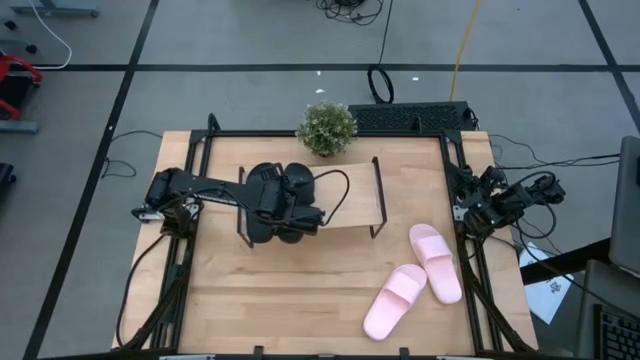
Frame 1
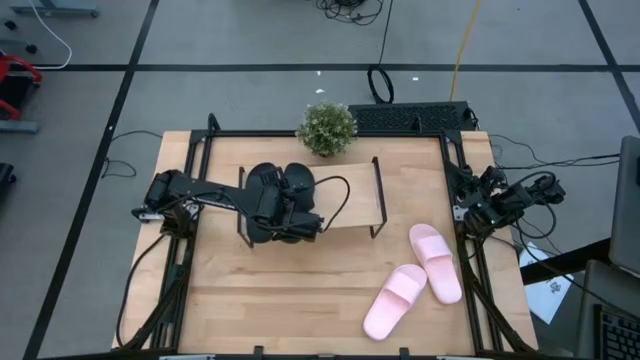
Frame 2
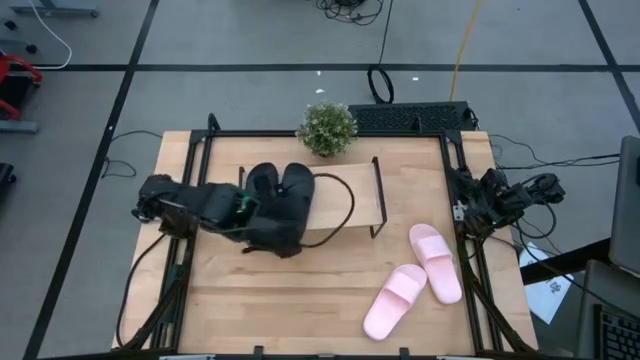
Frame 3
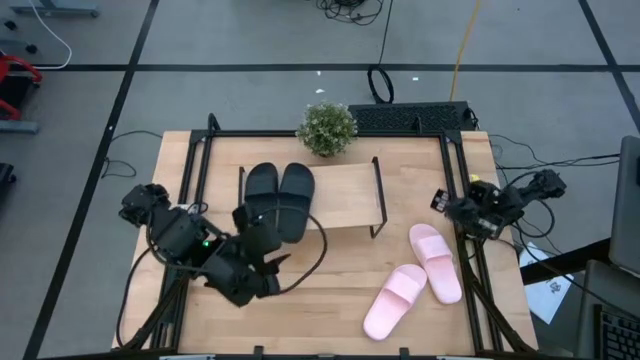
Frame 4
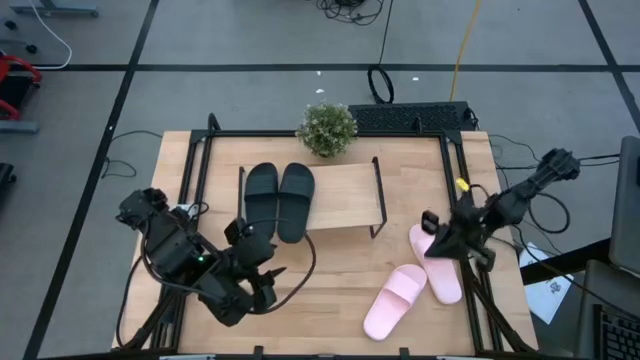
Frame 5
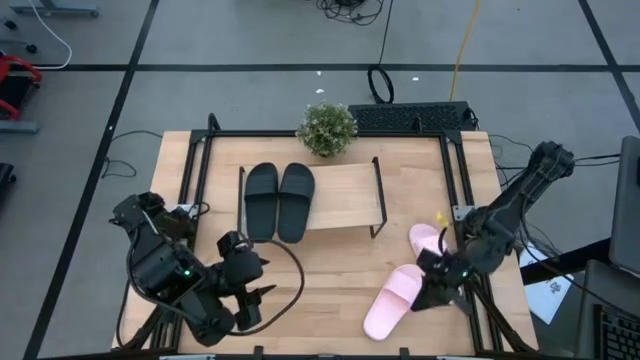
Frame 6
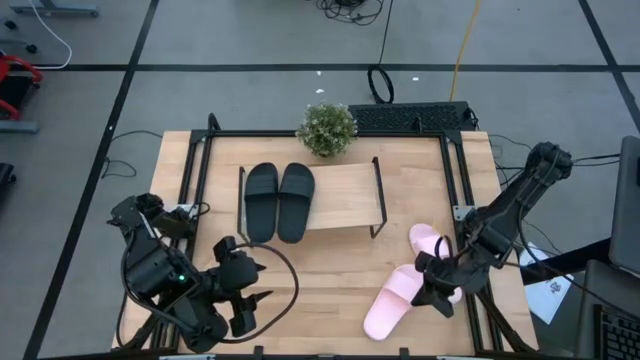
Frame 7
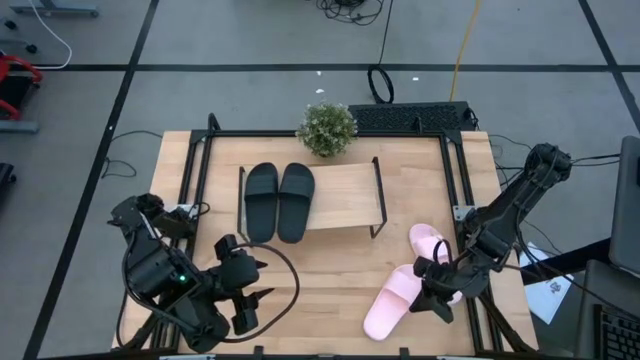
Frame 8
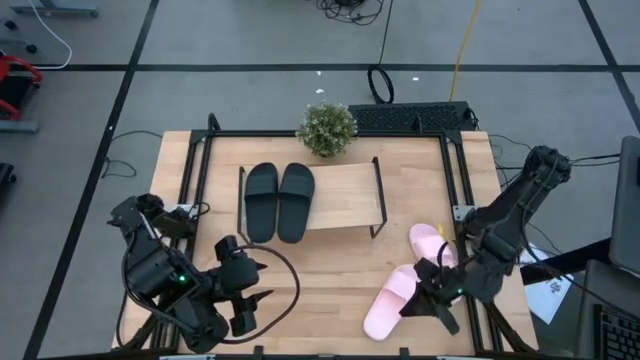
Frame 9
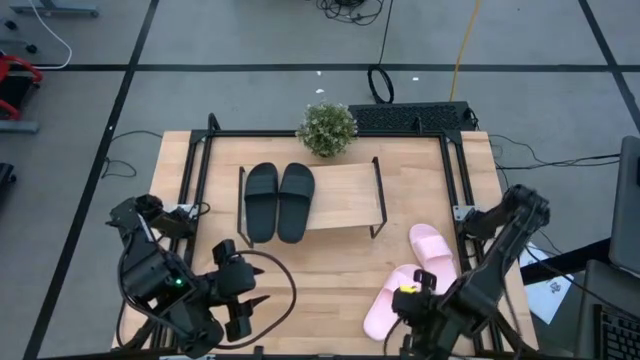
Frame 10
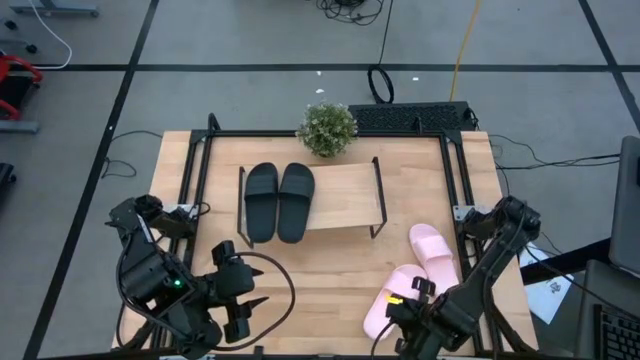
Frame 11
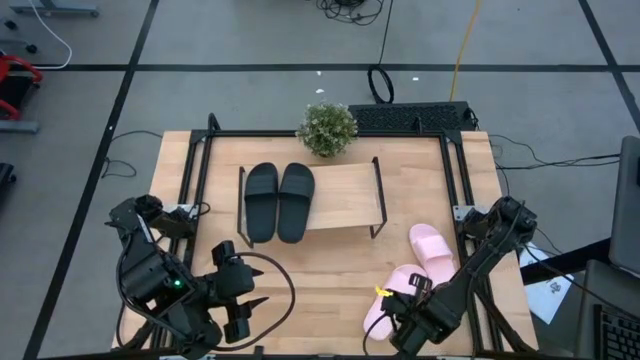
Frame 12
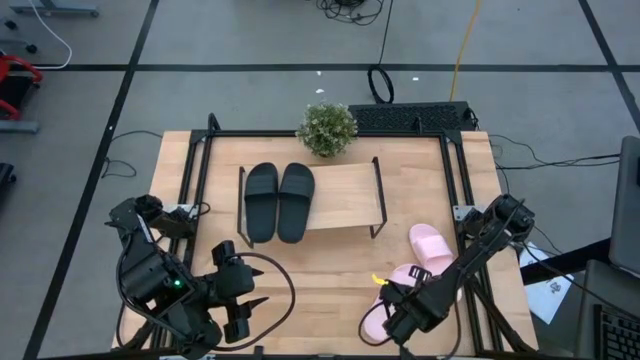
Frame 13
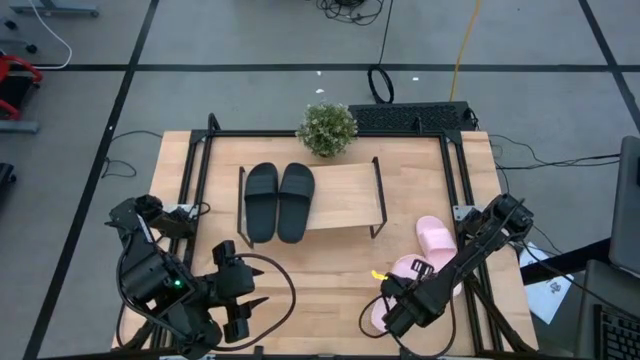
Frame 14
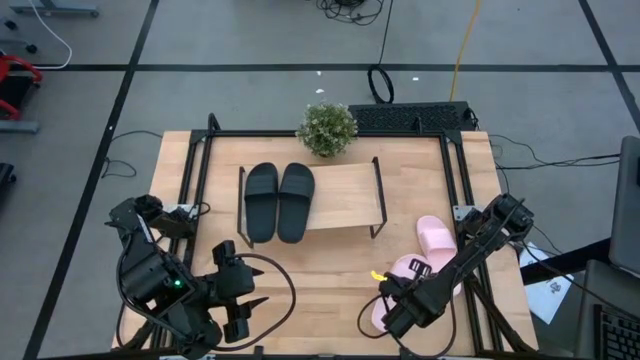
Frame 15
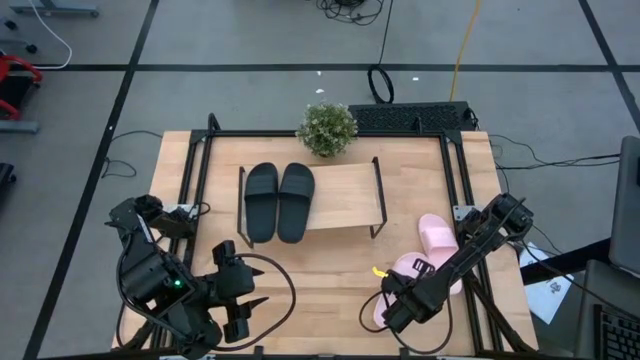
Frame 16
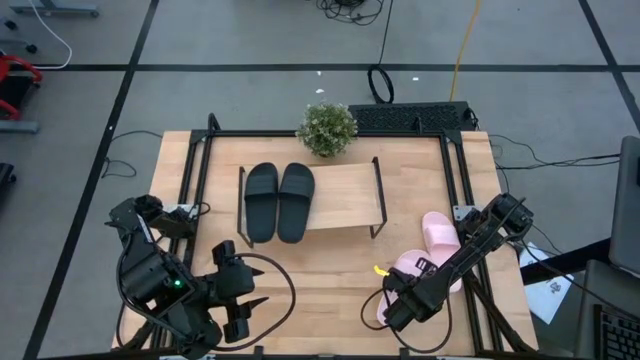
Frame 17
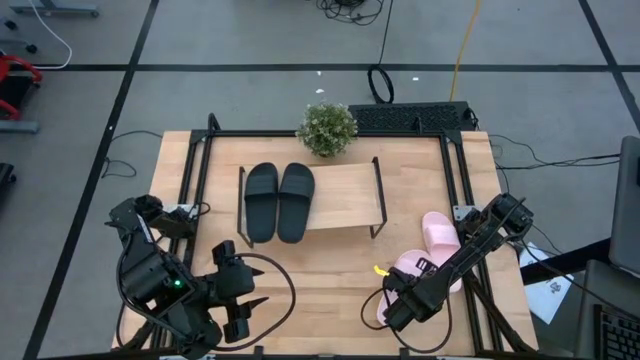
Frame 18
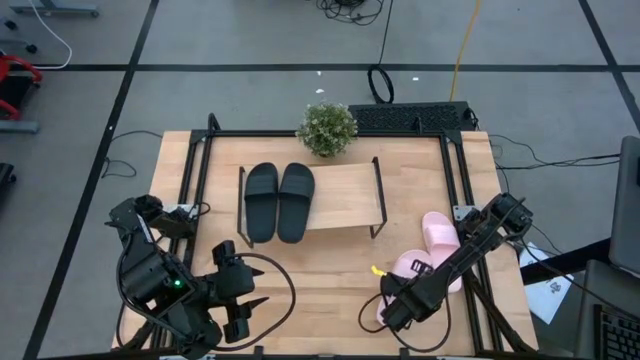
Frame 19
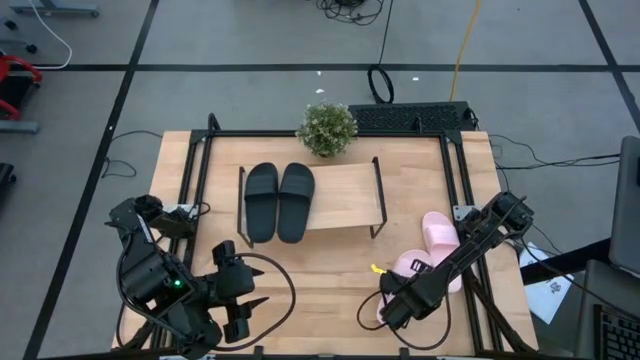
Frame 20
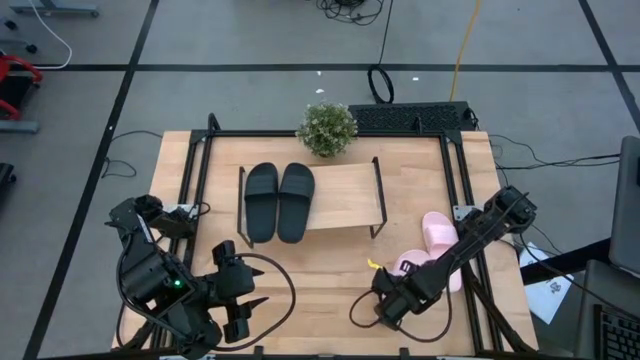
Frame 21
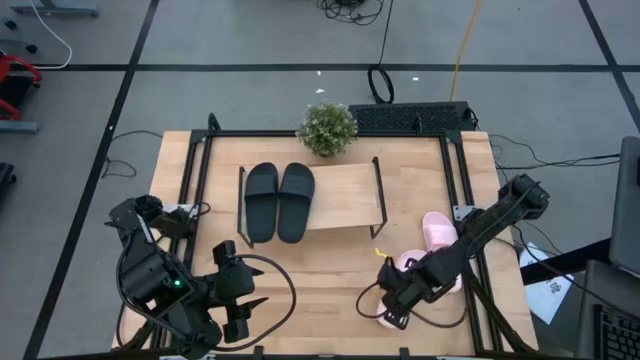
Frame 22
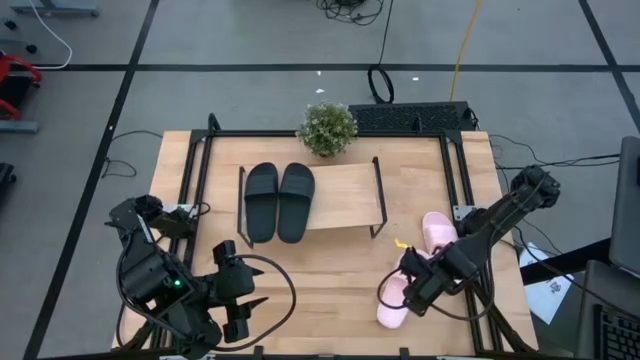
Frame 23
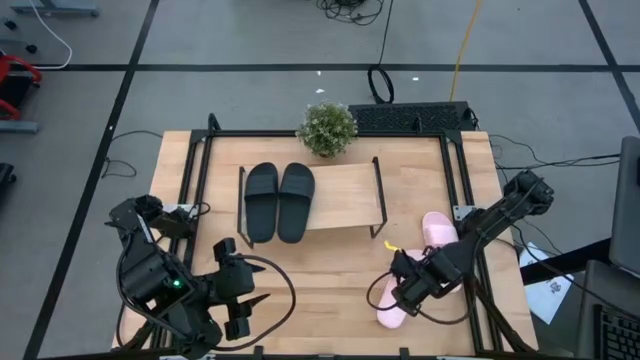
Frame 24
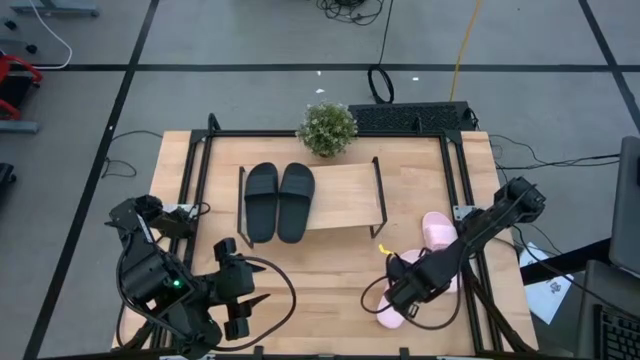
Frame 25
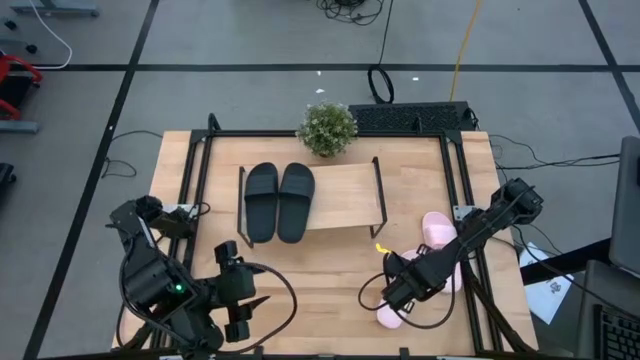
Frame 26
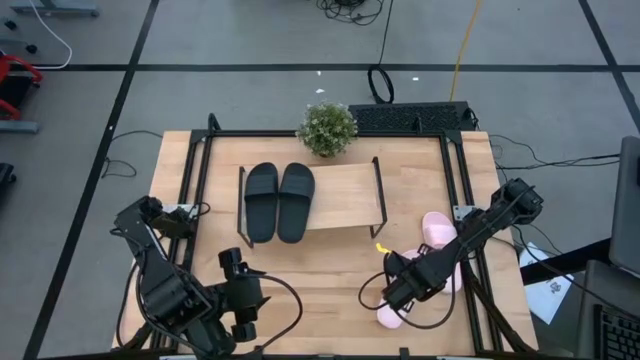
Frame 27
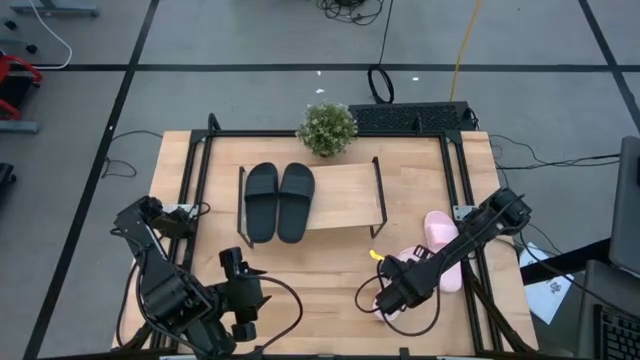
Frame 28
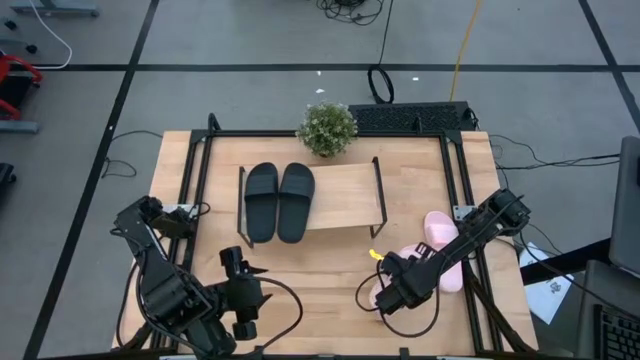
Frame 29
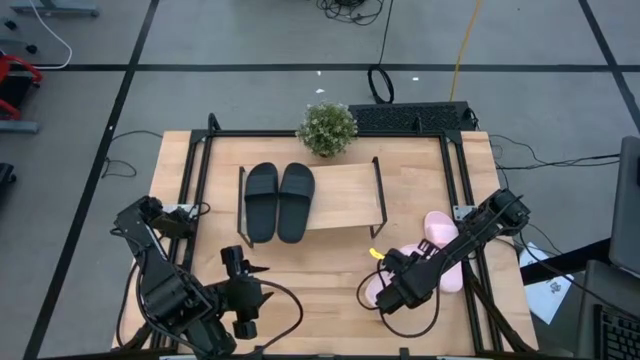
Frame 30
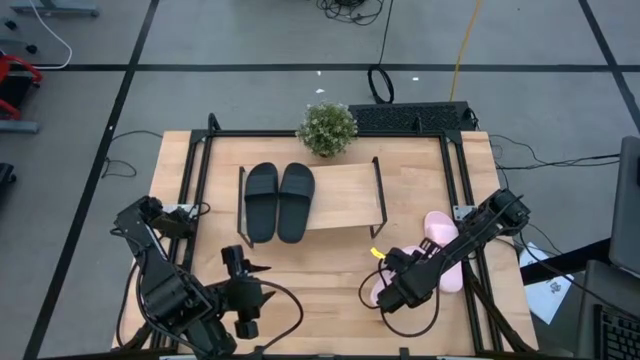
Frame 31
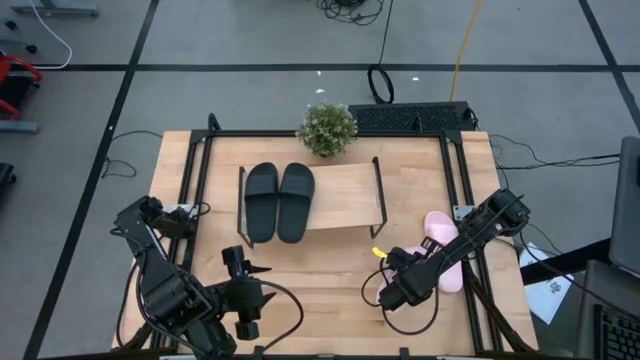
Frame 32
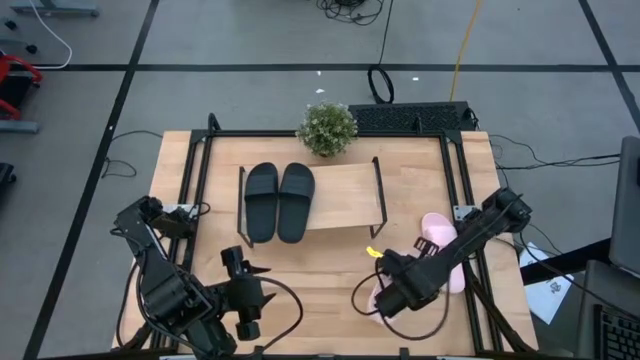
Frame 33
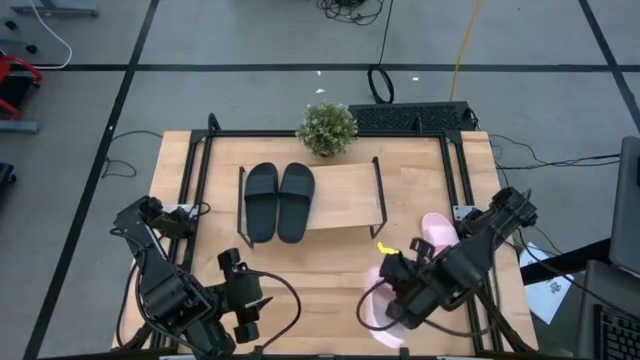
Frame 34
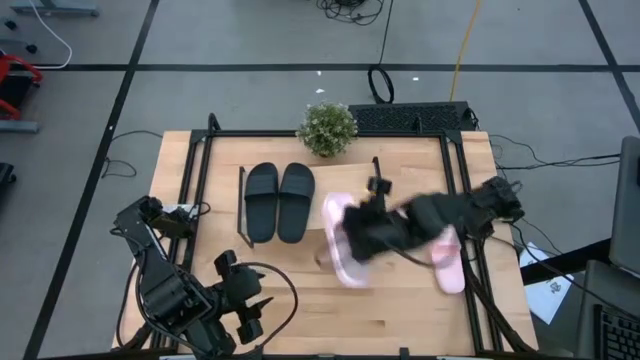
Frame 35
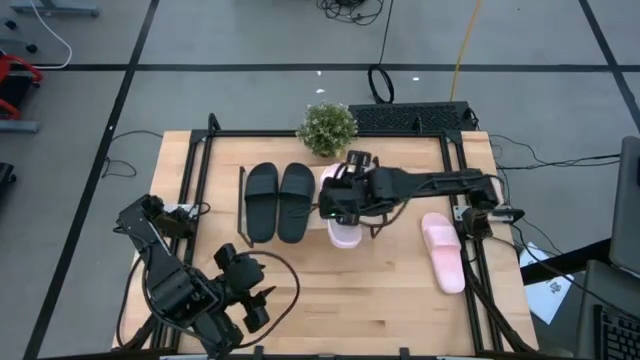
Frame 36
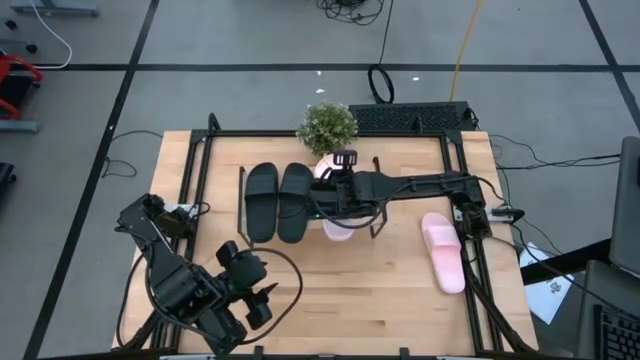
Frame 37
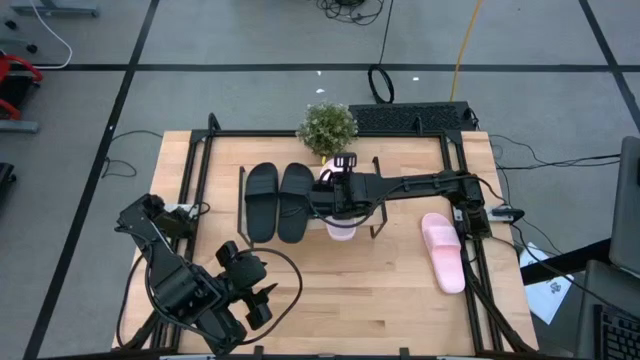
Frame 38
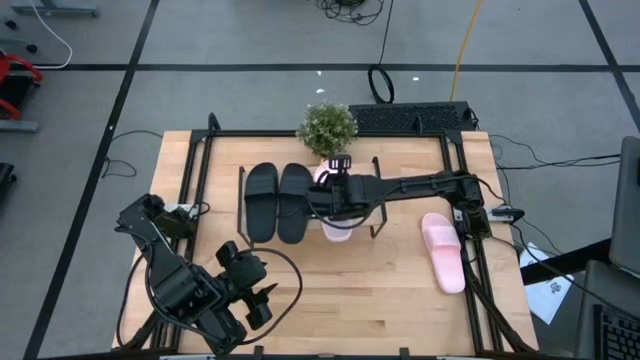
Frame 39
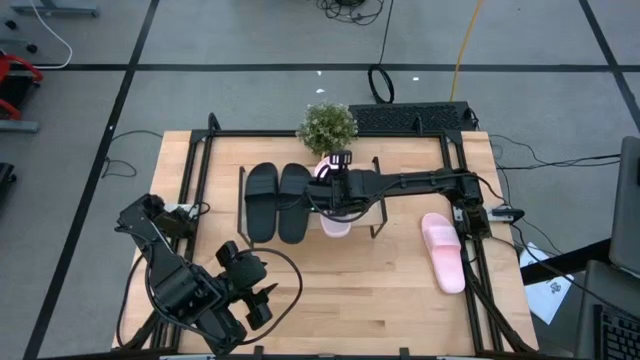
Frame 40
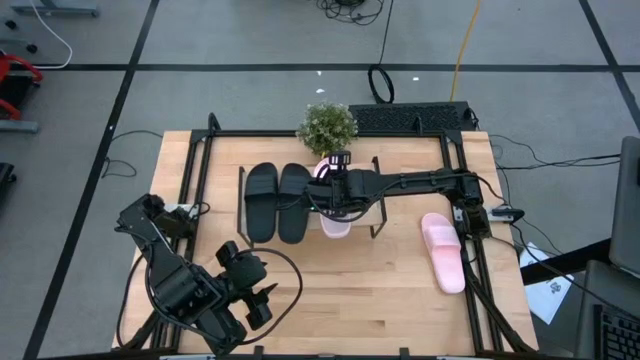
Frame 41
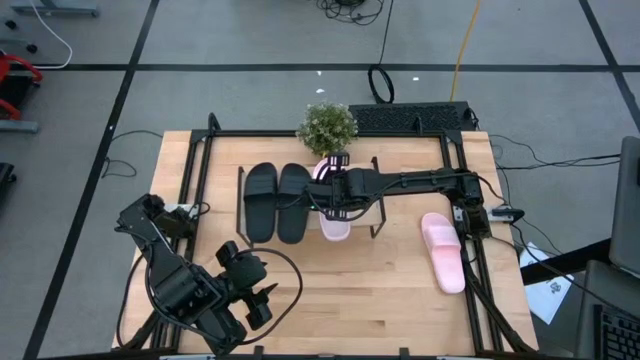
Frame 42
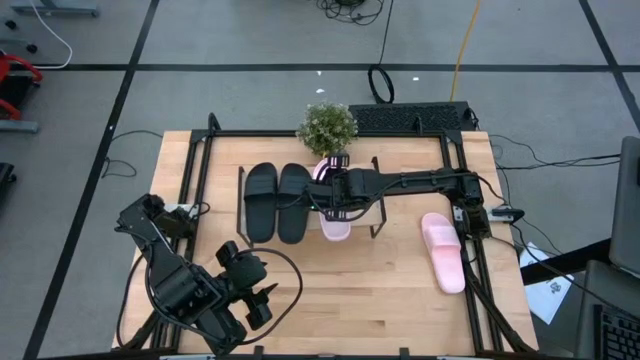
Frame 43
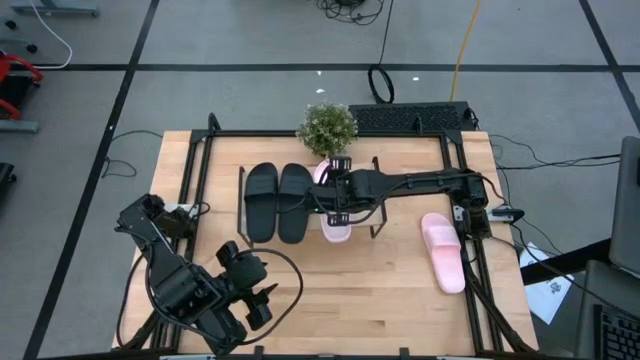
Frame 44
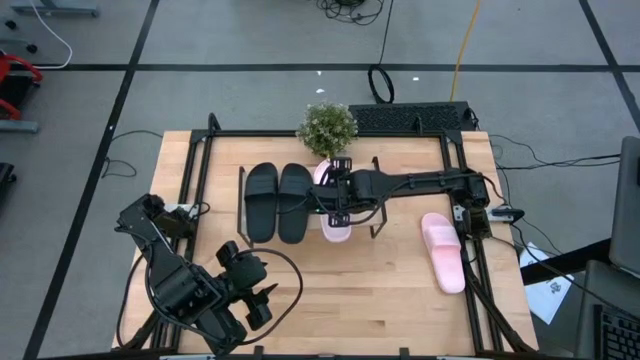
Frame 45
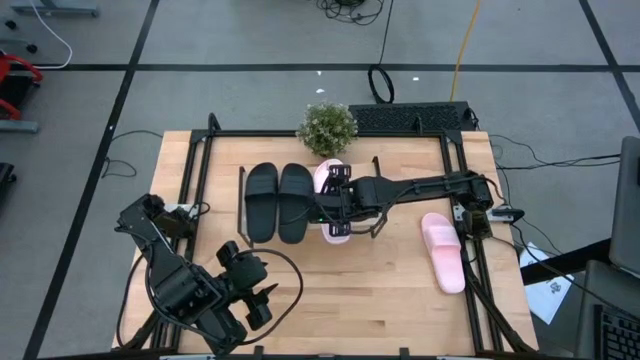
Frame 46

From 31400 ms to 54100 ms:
Task: Pick and place slides into the shelf
Put the bottom pink slide on the shelf
